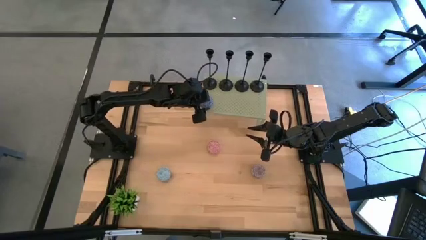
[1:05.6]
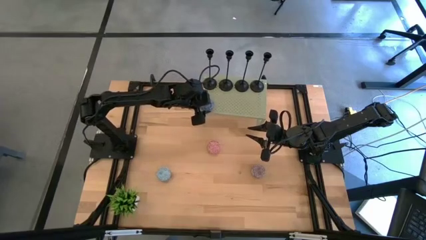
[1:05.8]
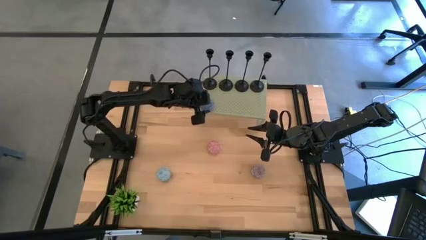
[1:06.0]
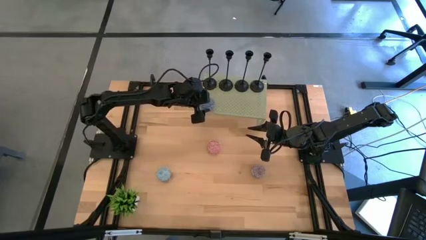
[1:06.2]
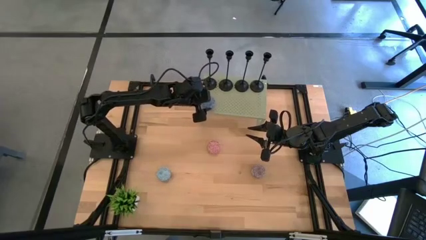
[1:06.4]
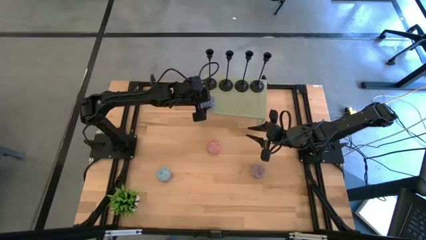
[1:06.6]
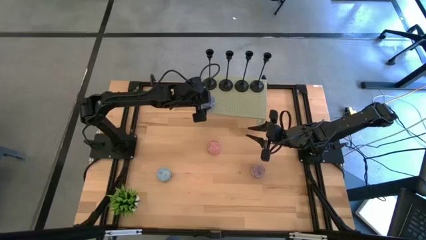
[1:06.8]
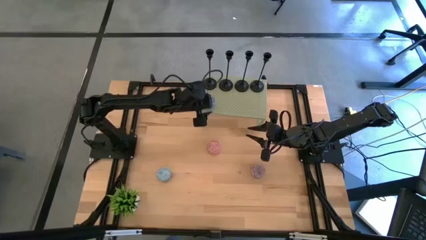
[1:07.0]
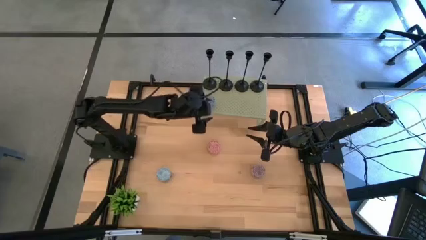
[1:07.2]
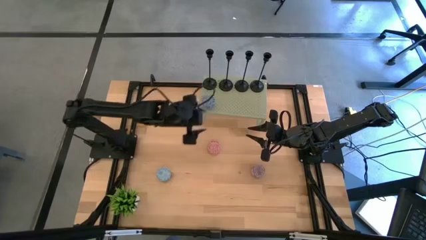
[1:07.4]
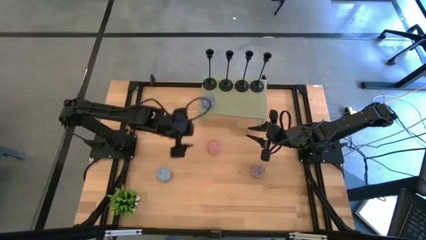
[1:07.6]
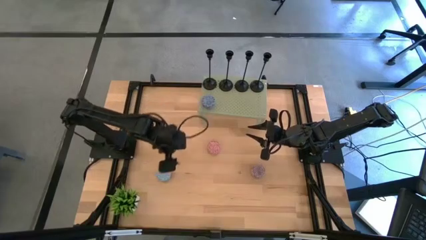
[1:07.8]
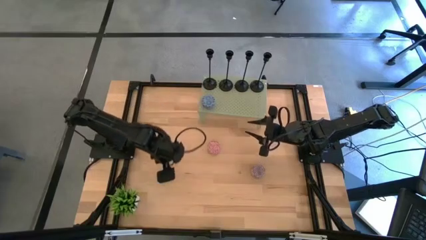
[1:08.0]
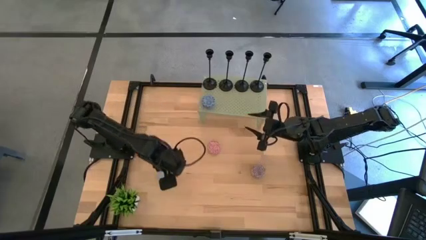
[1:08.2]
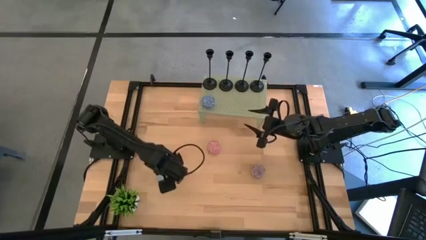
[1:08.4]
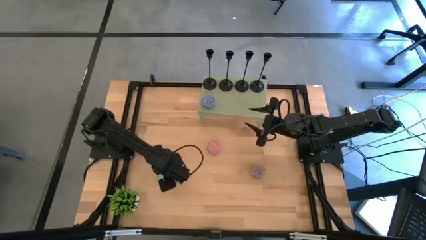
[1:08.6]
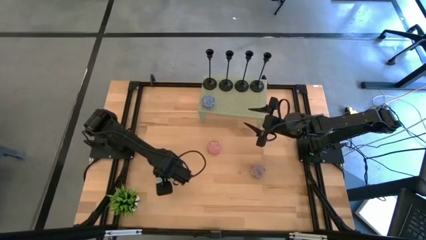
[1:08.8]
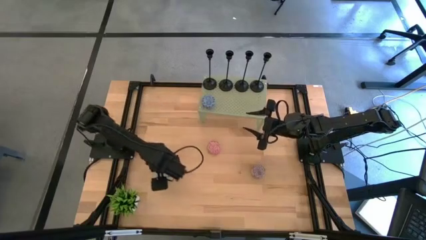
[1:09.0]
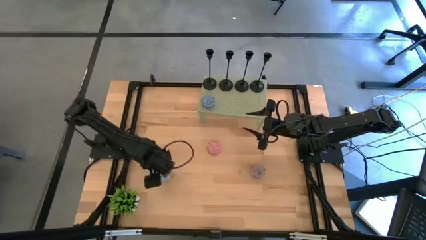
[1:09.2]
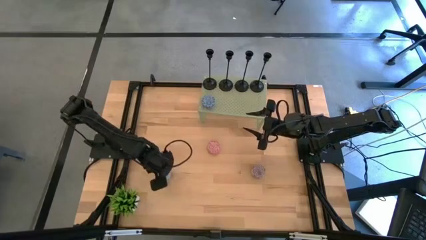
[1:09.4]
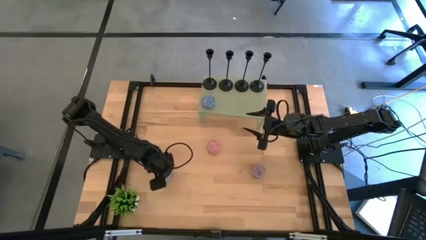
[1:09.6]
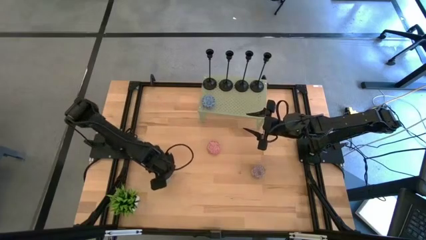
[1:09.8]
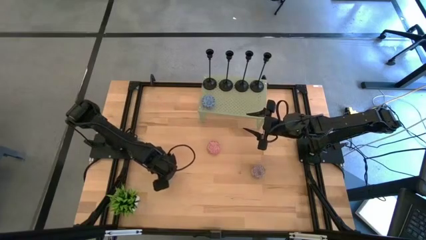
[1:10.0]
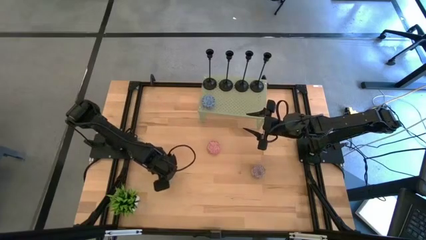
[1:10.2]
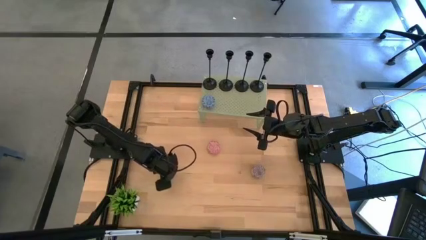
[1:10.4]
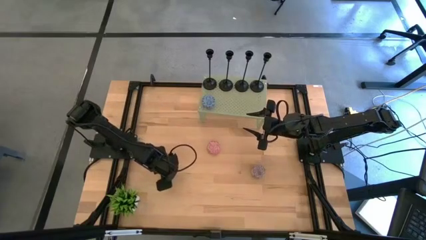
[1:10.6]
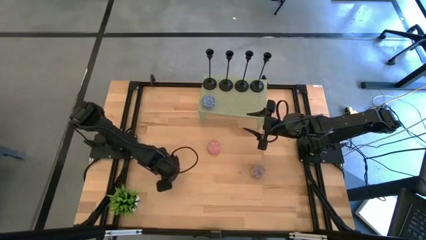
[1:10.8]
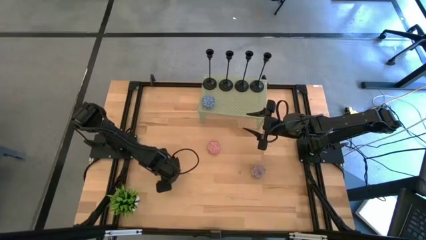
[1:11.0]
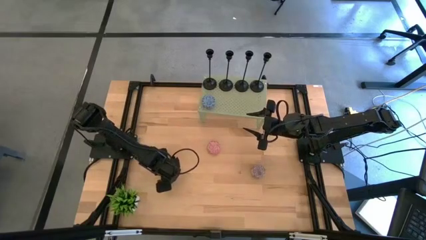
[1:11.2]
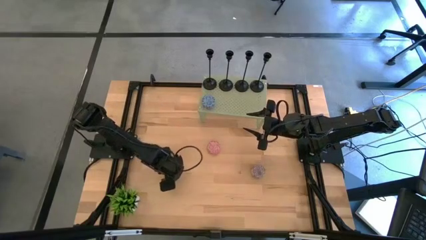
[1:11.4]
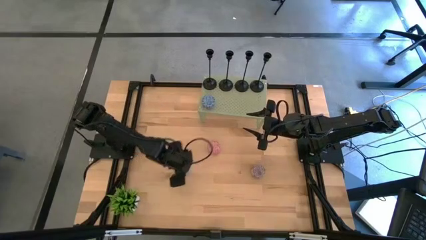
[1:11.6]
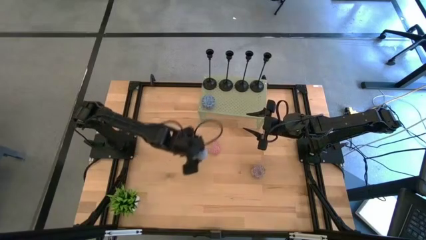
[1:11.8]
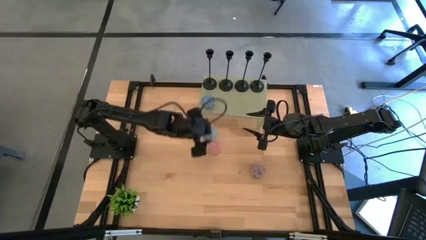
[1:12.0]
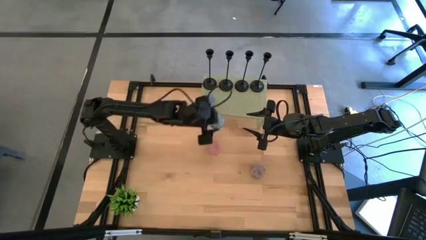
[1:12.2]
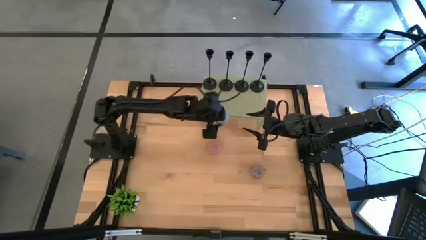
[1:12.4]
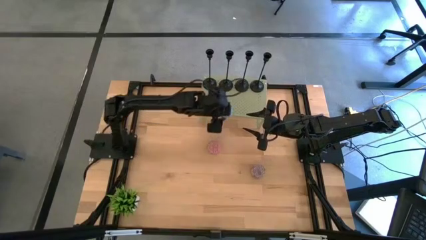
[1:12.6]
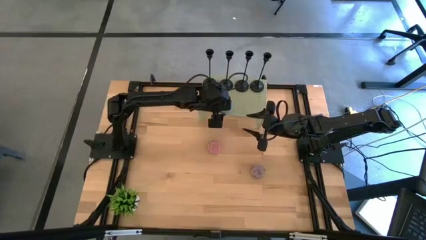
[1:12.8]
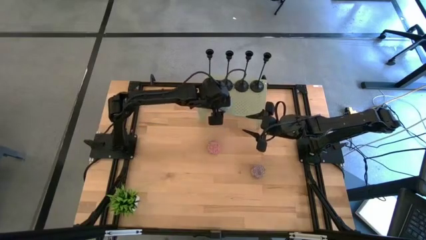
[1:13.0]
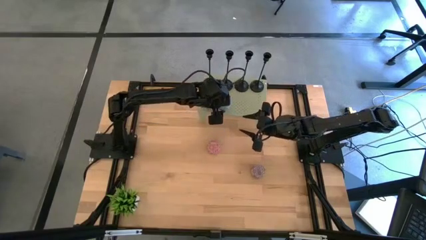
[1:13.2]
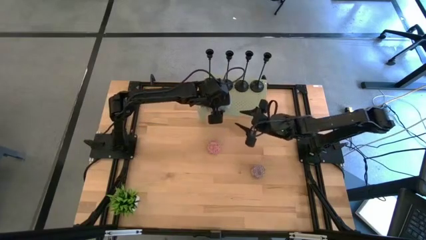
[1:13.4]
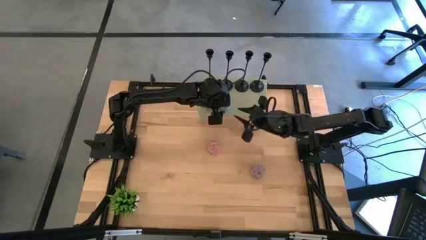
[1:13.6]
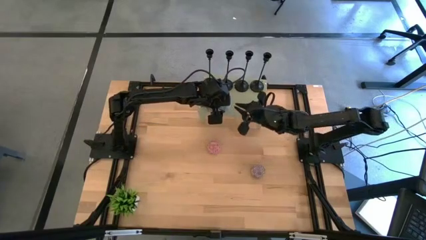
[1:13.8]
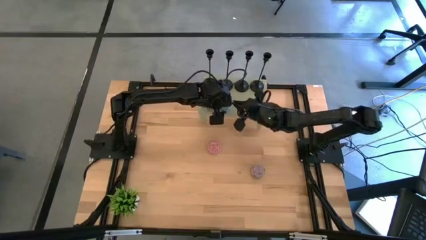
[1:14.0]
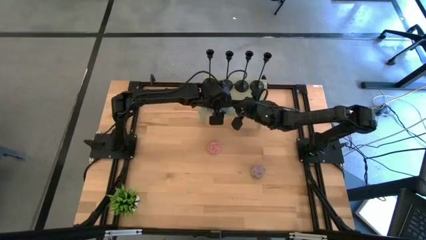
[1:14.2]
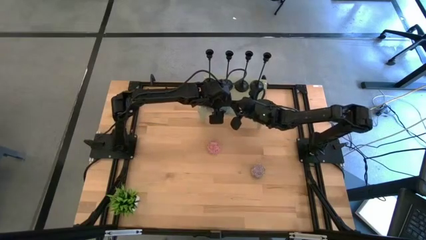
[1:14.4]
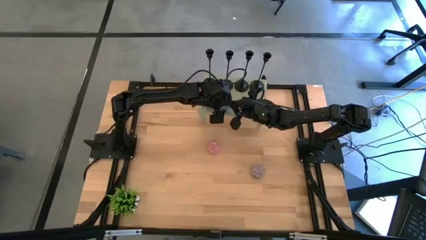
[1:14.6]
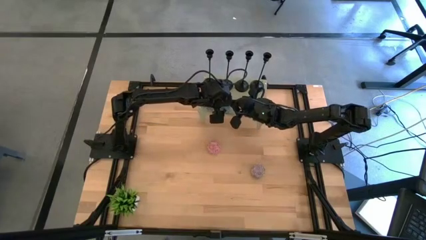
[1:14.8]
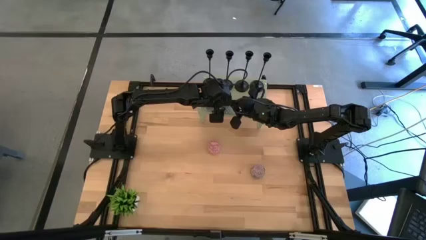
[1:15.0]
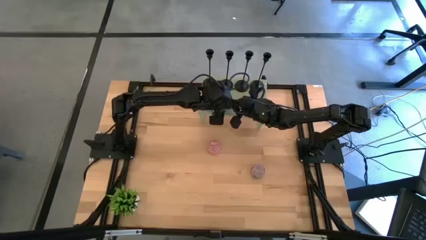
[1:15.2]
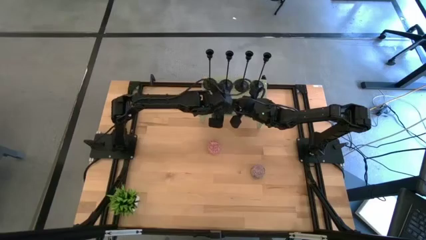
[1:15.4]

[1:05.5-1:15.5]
Task: Pick & Place candle stick holders
Put the light blue scented candle on the shelf

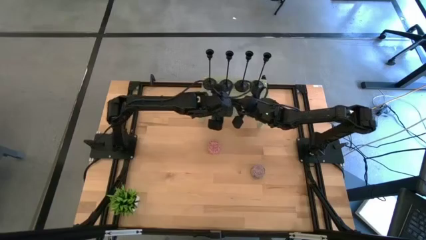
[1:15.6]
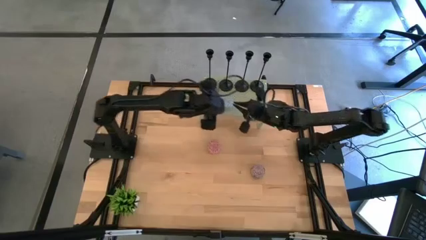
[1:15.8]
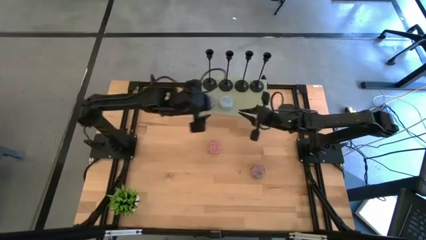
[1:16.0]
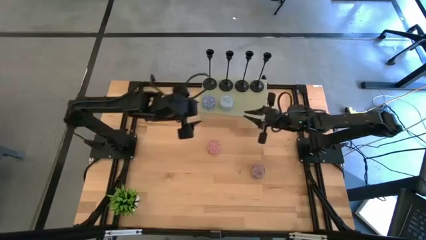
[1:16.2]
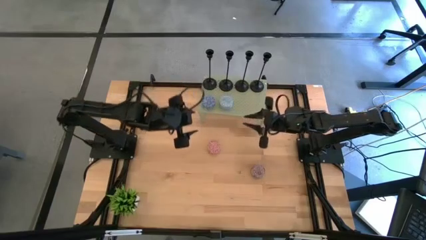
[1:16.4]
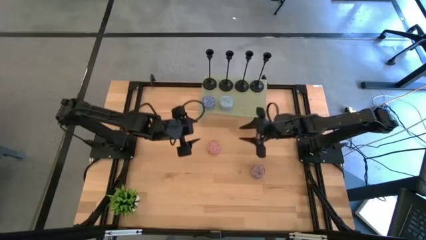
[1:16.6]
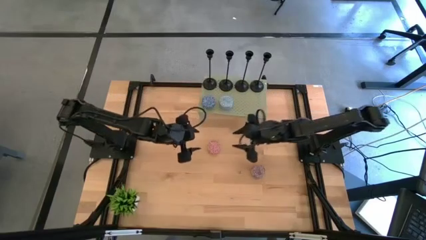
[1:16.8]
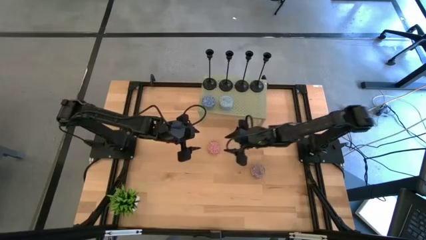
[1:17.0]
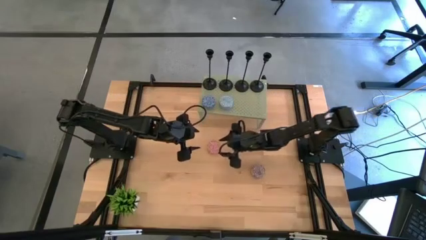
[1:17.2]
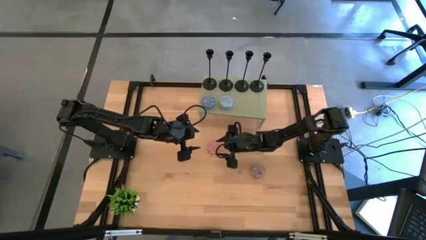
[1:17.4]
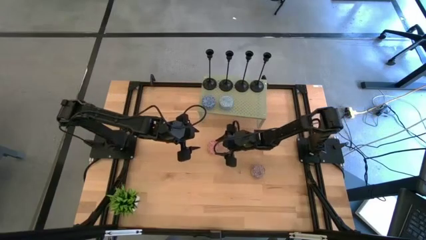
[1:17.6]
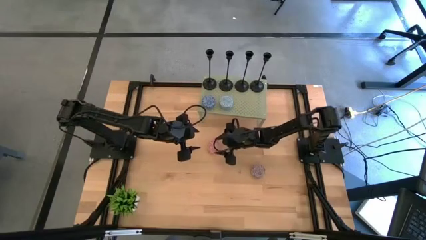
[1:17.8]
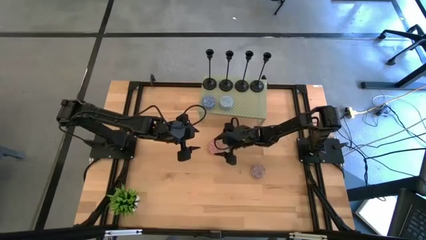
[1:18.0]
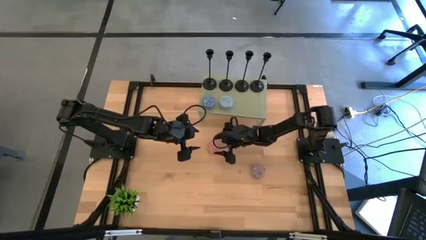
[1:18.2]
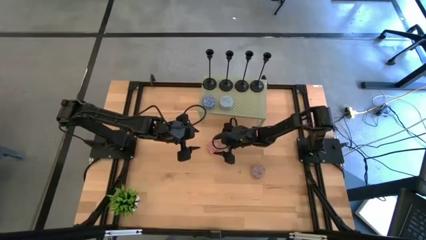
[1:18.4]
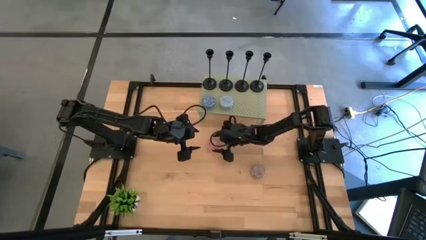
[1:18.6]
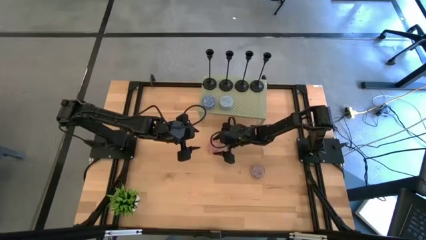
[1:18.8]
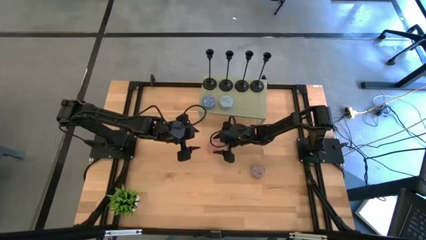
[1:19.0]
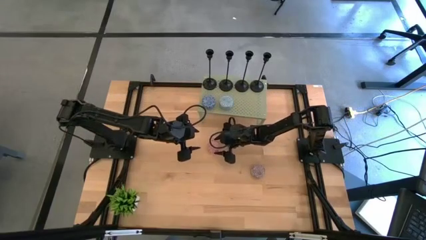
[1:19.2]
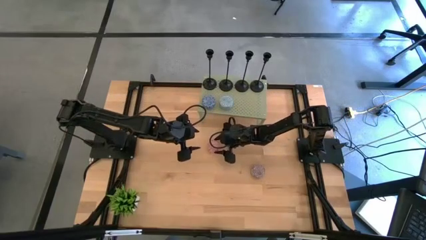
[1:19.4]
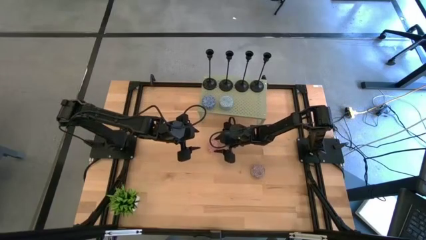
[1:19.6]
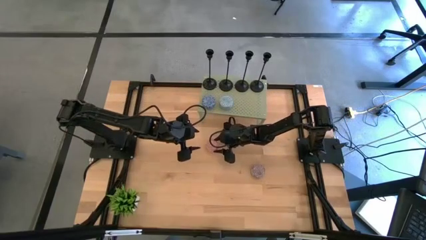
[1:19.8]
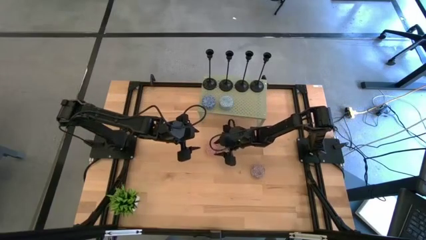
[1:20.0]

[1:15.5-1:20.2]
Put the pink scented candle on the shelf

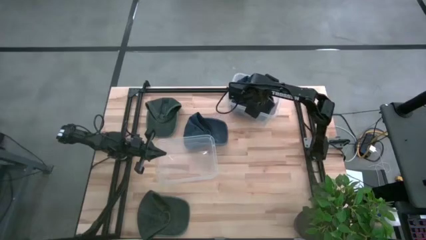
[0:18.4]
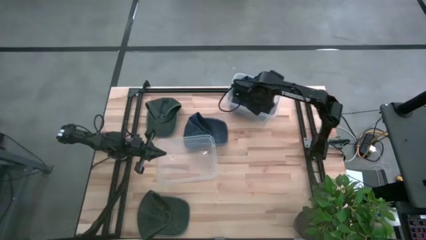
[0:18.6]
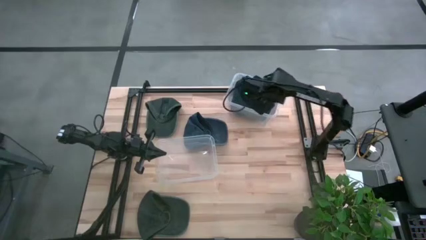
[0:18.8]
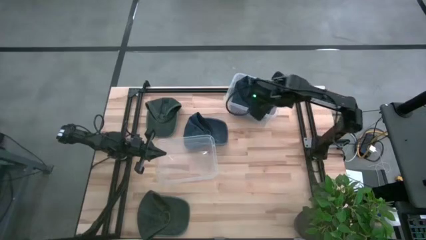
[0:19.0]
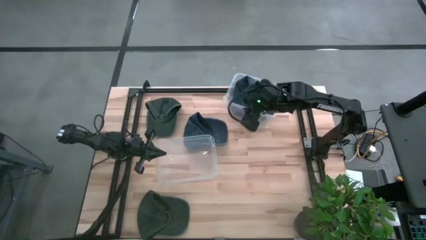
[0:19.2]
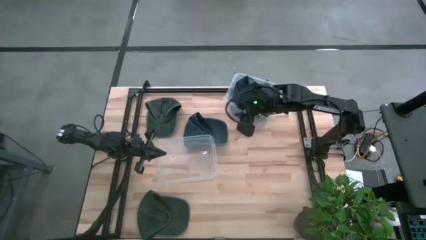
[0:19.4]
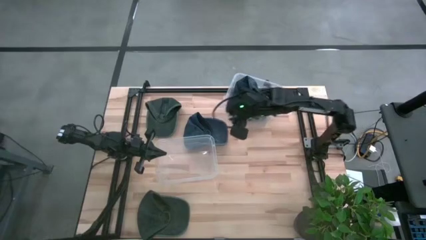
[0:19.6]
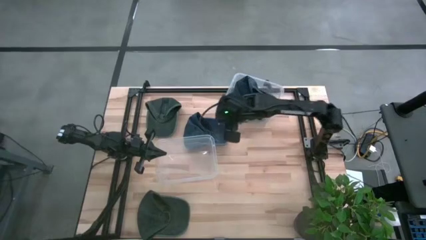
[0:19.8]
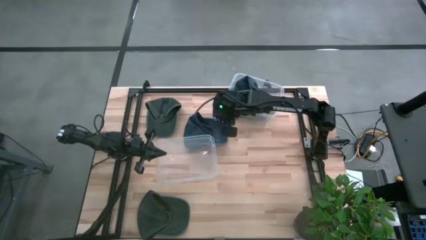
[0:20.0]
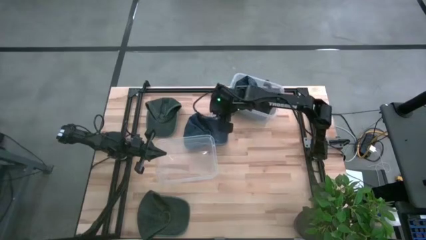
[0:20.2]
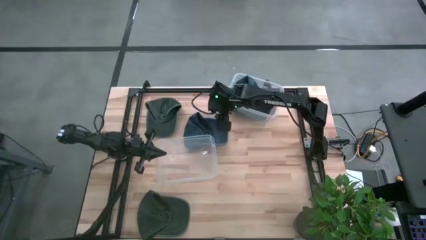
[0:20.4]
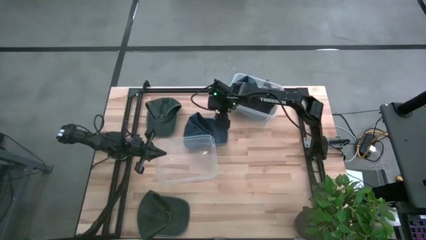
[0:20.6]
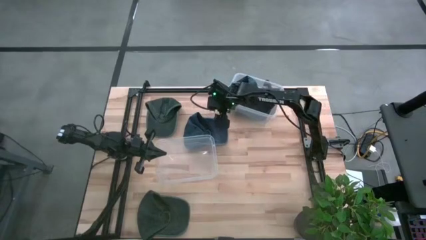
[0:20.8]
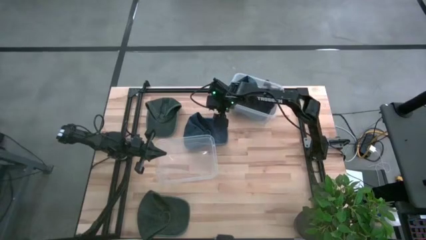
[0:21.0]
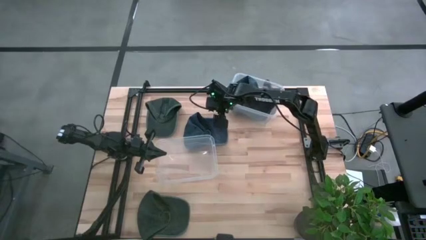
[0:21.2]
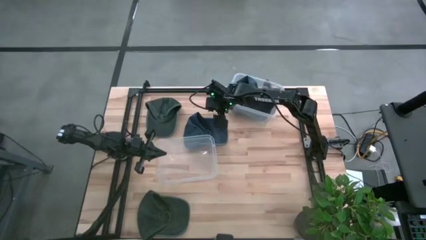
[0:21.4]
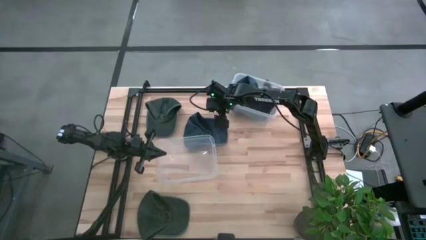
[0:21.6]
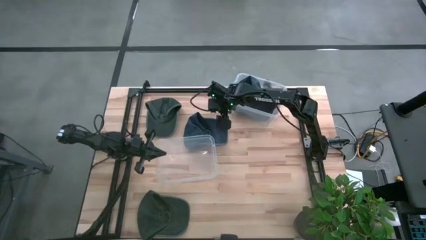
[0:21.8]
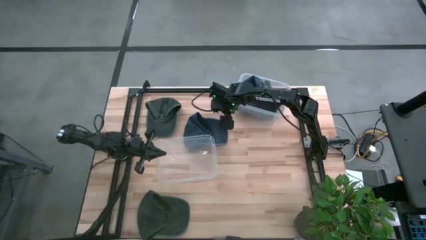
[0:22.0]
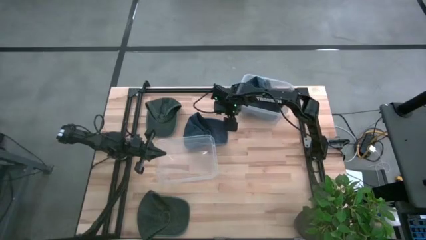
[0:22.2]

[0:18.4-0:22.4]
Task: Pick & Place hat
Adjust the top transparent bin
